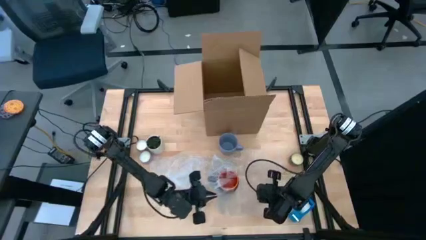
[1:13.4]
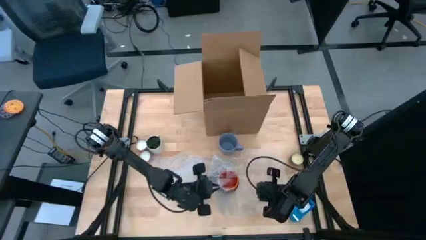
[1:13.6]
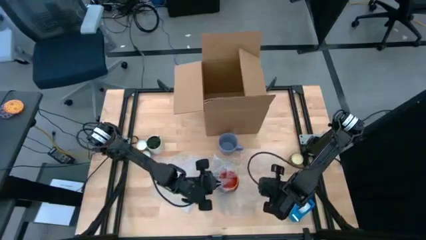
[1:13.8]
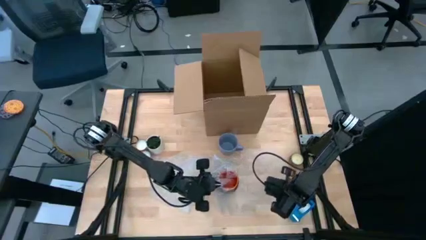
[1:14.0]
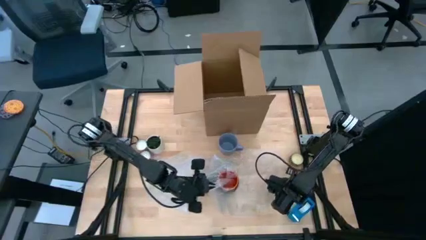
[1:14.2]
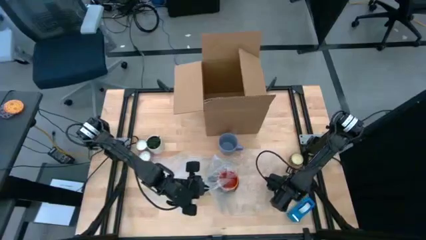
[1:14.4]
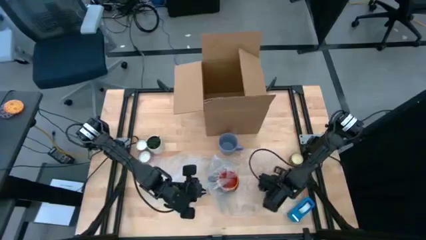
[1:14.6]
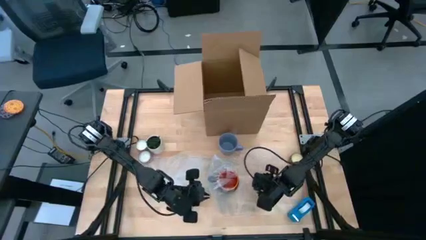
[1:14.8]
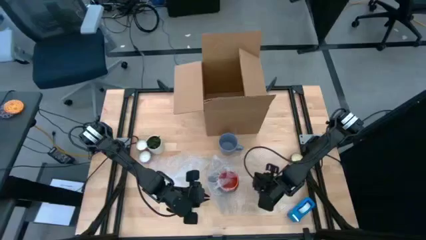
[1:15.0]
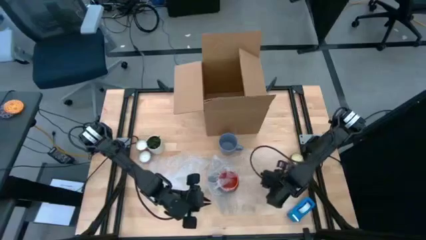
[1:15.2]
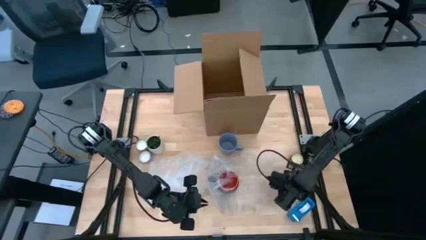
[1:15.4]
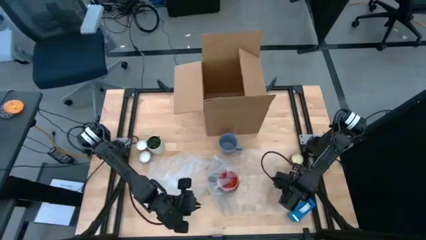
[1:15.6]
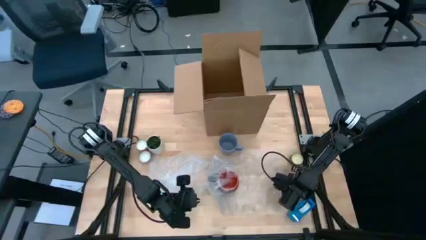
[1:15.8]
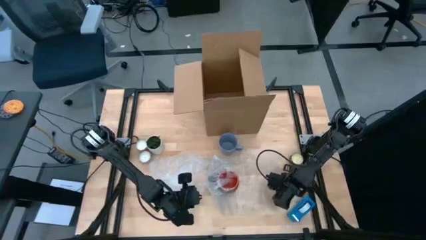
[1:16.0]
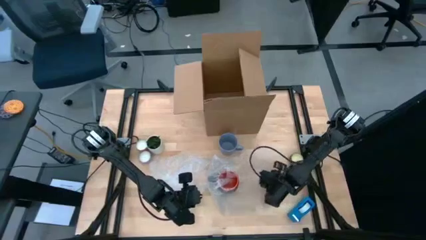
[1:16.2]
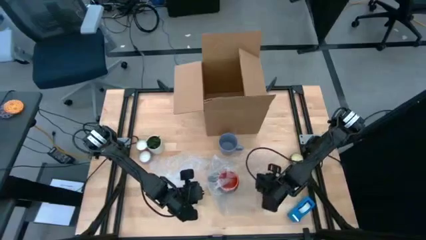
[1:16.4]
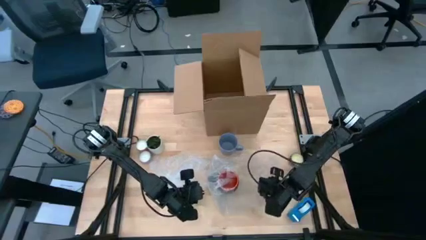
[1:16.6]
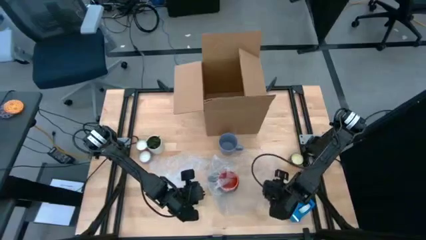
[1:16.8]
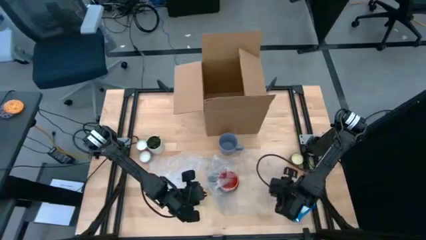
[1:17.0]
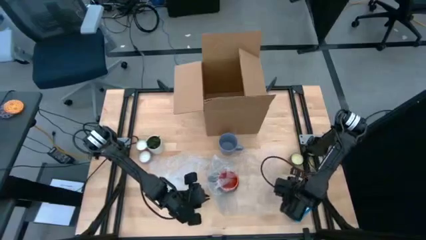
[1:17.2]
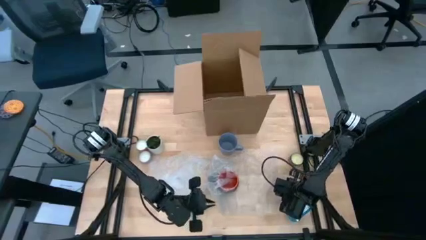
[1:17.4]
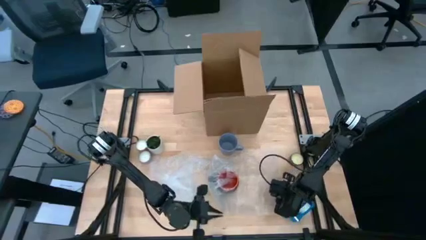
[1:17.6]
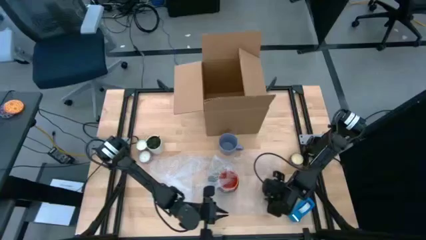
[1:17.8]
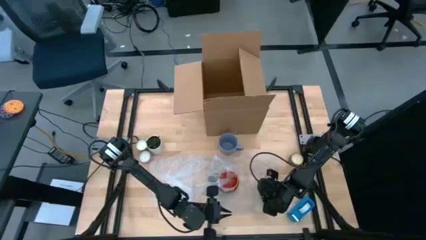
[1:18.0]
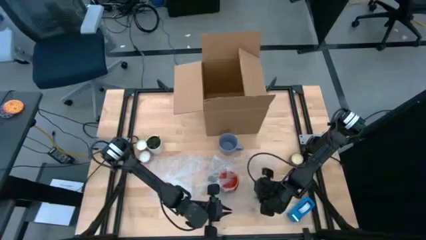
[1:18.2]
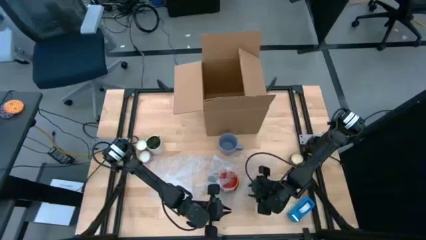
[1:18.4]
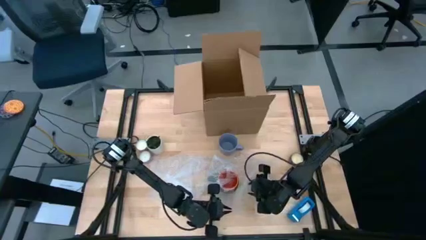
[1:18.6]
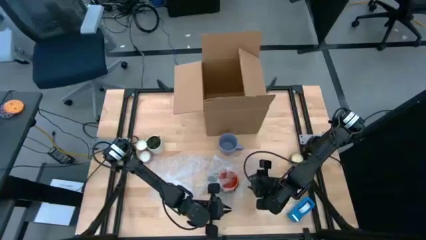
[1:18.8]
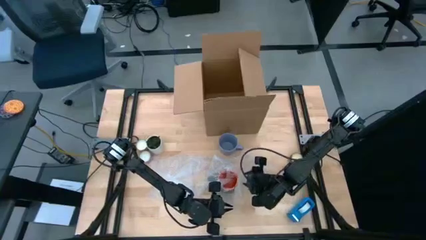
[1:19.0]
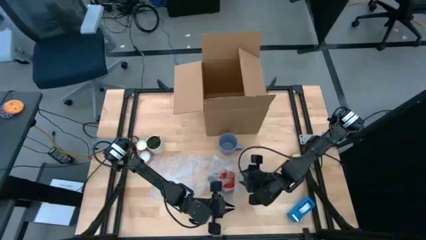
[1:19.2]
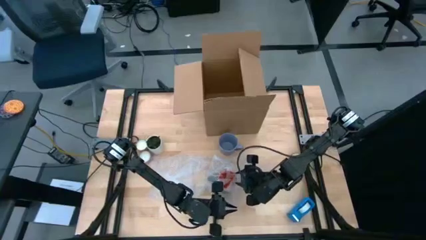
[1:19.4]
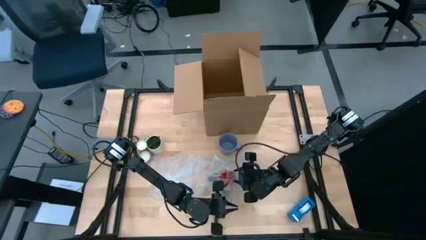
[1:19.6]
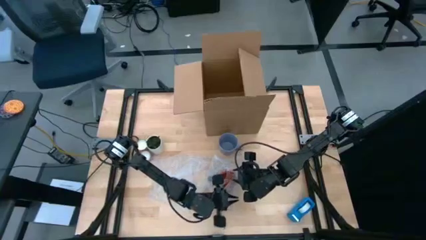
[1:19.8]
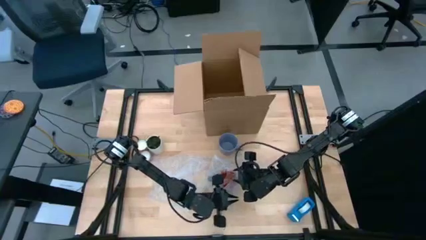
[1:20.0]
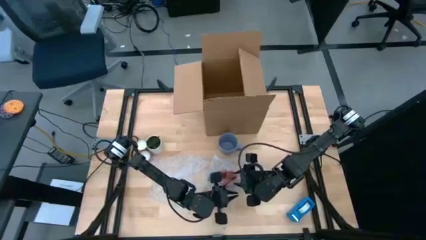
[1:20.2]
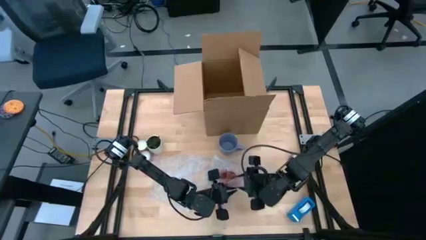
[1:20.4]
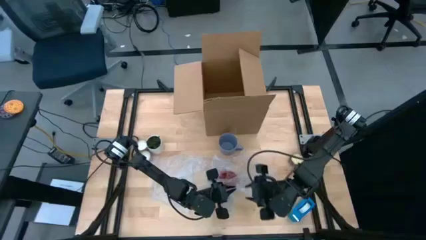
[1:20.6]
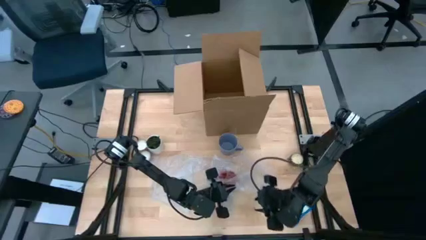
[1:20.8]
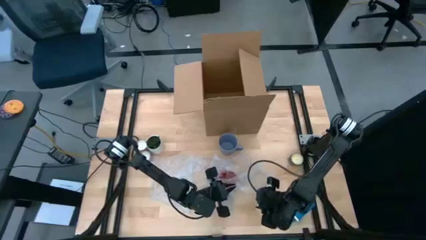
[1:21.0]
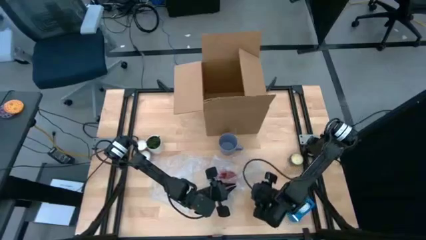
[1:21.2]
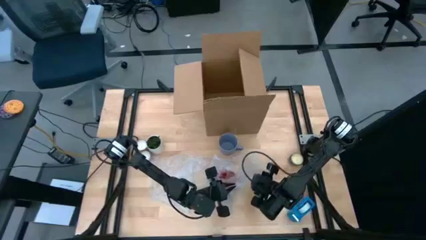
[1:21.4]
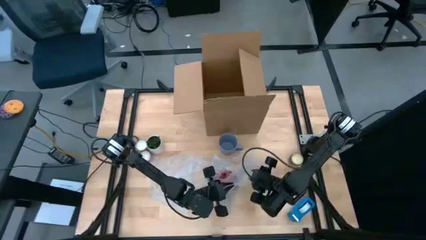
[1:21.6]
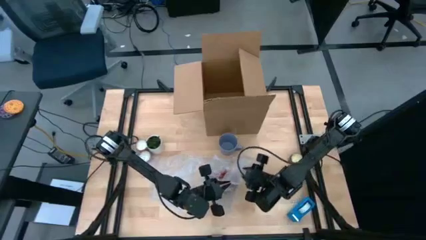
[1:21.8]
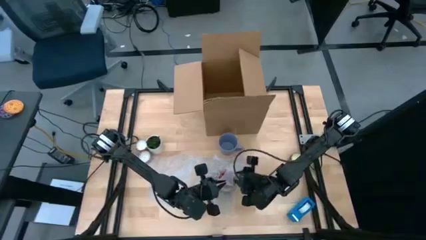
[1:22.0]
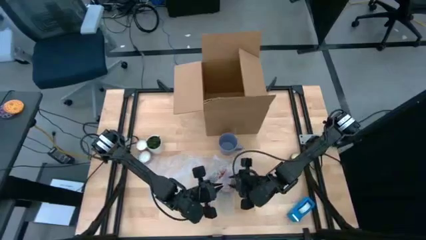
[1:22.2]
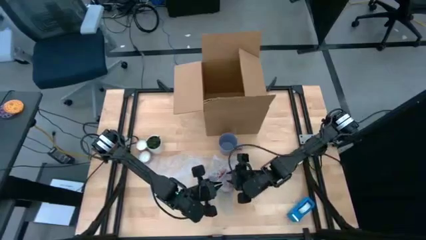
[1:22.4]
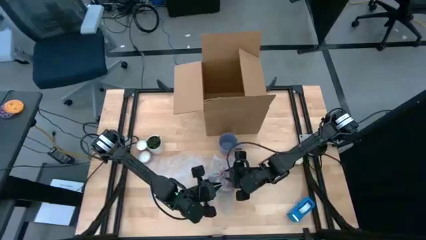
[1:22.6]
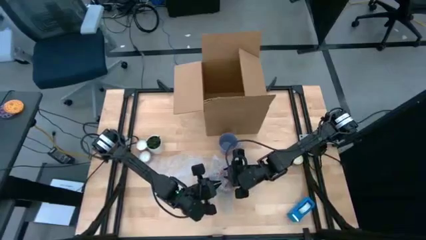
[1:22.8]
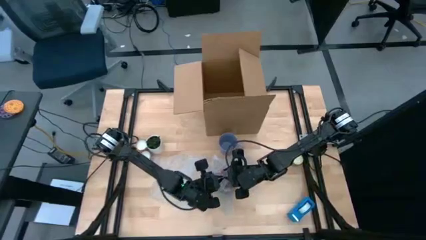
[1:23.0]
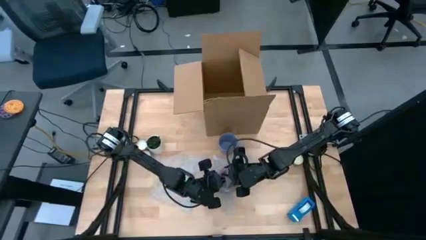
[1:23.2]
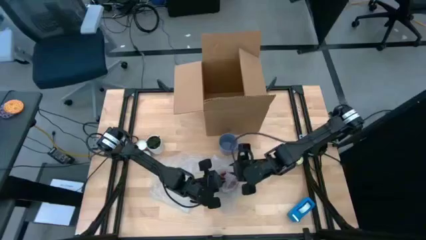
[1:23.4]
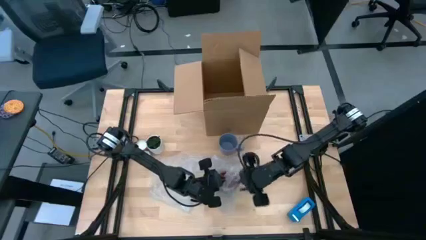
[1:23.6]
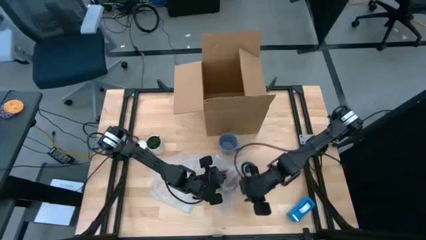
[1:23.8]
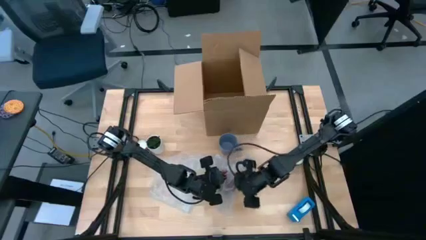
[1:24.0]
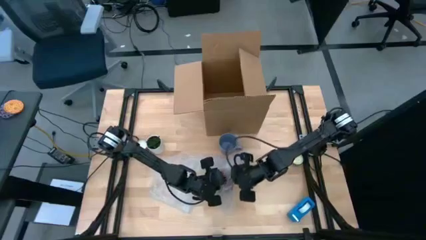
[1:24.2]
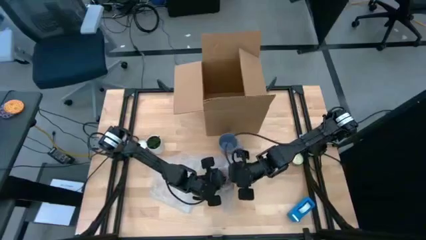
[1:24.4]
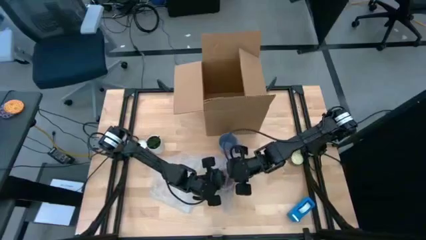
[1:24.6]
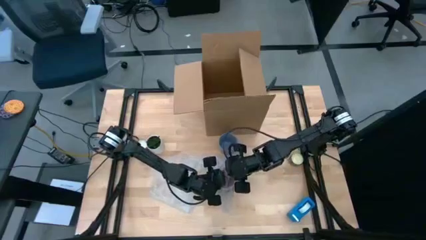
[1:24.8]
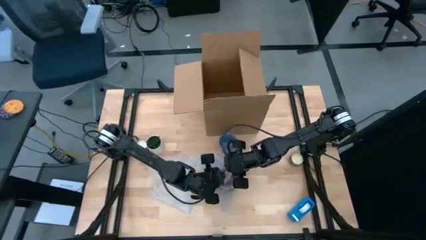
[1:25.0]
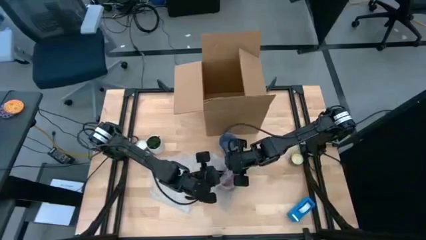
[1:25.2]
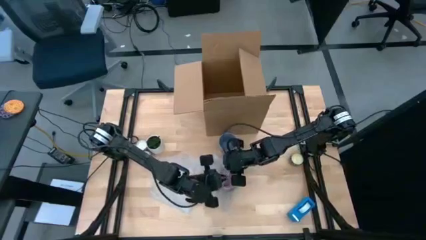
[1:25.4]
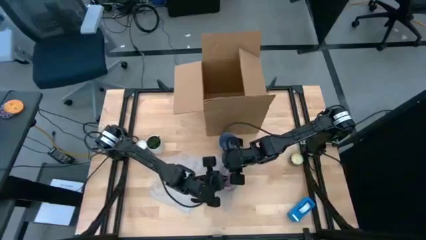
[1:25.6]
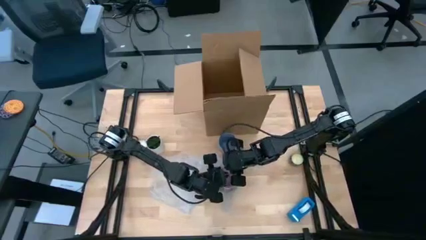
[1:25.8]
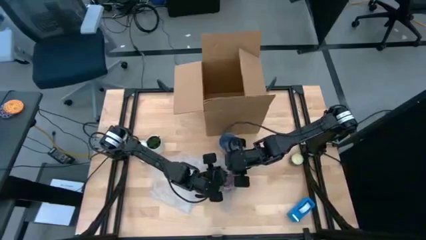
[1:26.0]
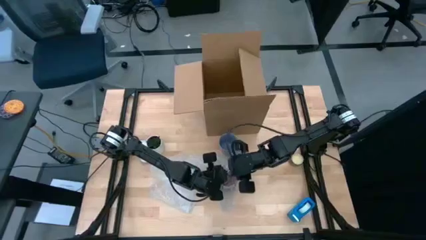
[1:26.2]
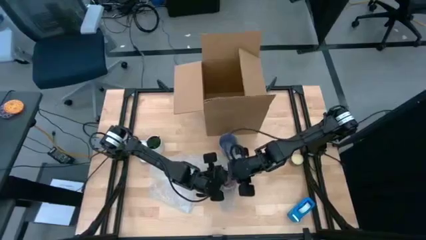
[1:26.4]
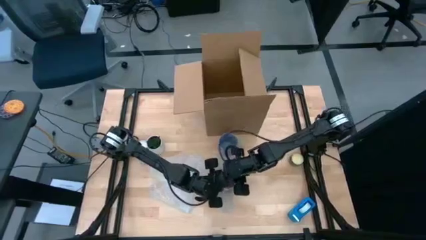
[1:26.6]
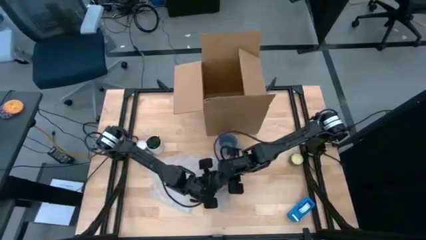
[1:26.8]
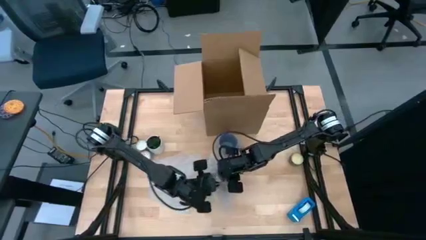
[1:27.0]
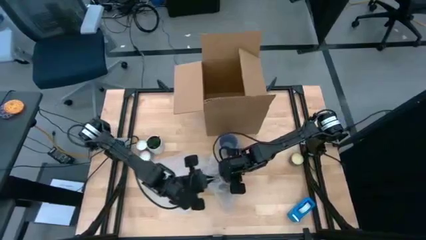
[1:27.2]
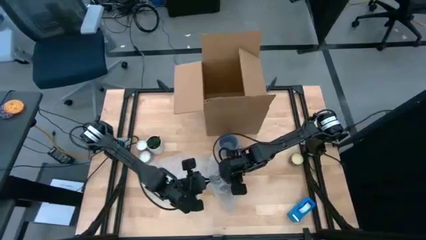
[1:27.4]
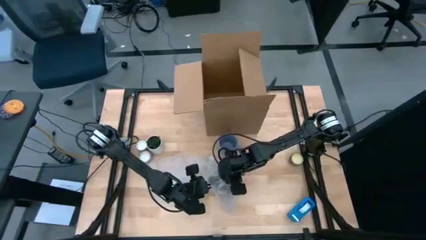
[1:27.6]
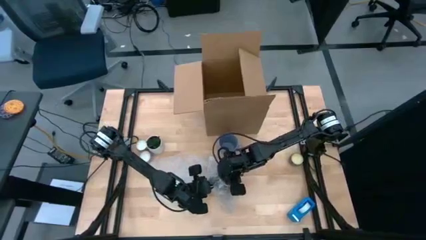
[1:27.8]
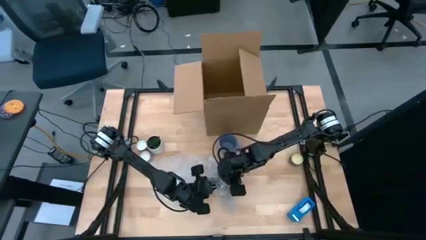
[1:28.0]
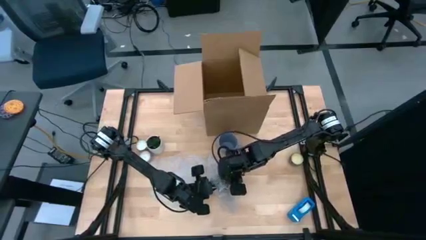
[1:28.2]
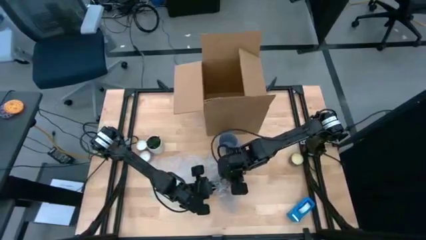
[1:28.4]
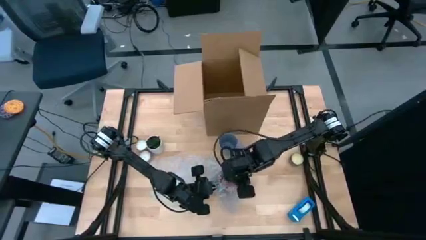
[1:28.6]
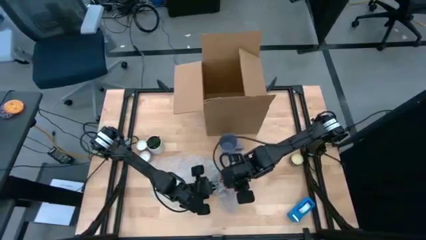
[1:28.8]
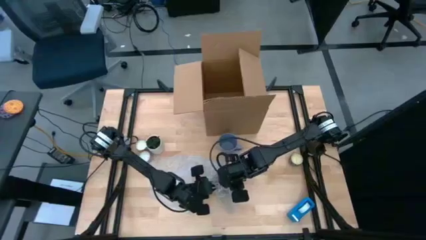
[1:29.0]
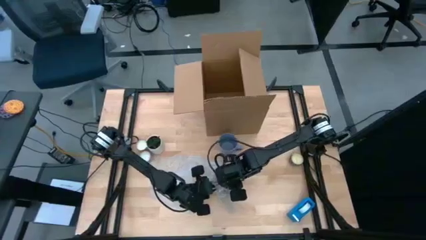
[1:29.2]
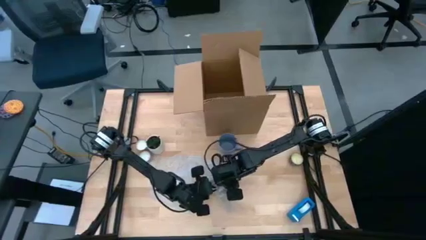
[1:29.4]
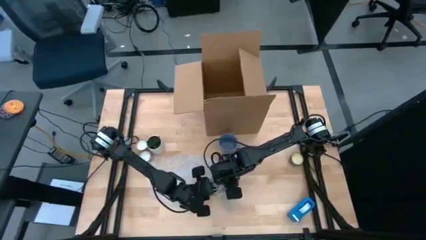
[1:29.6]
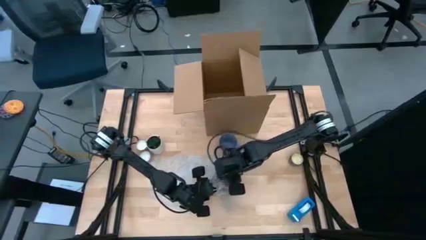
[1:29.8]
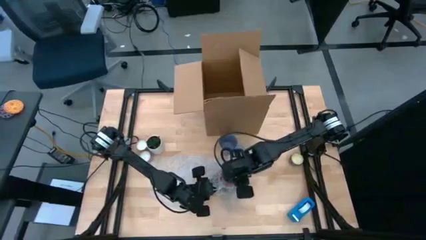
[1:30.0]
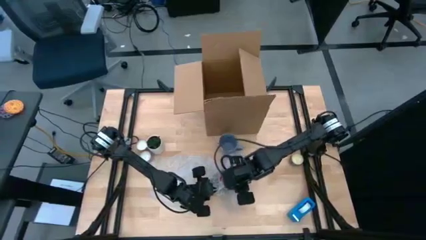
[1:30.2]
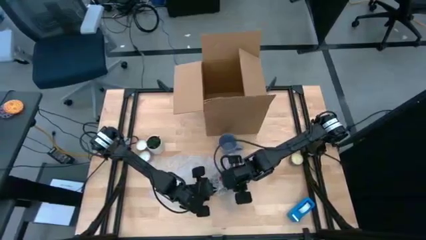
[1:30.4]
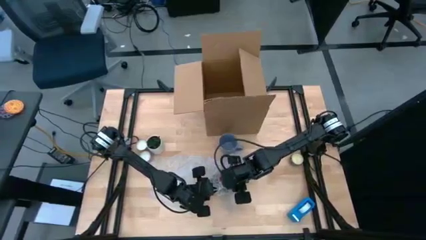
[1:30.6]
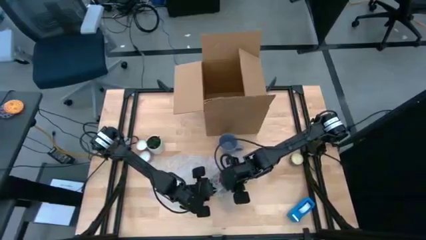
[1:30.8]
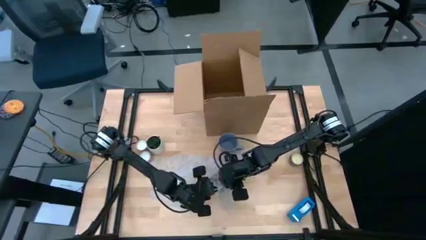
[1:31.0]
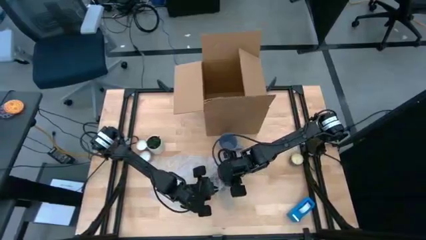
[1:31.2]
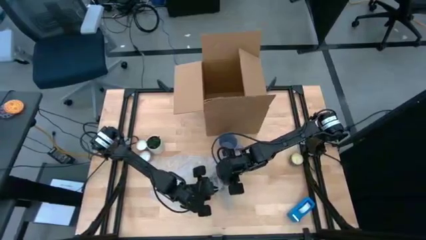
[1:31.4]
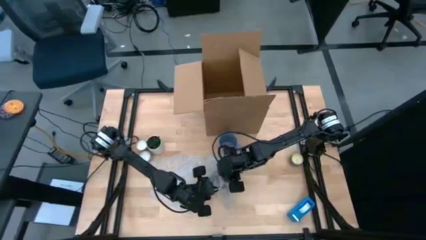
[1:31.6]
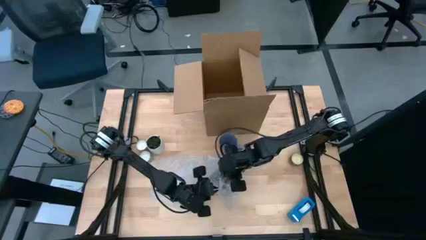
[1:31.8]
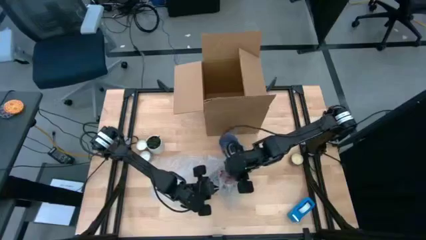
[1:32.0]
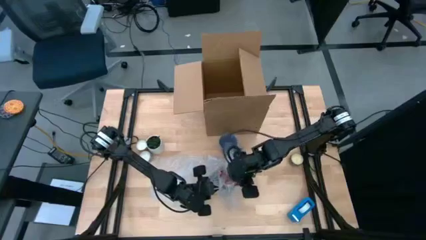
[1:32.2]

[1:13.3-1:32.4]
Task: wrap mug
Wrap the black mug with the top bubble wrap
